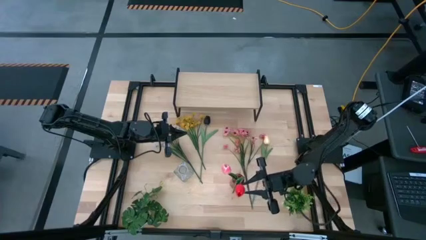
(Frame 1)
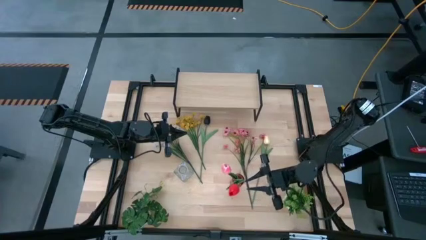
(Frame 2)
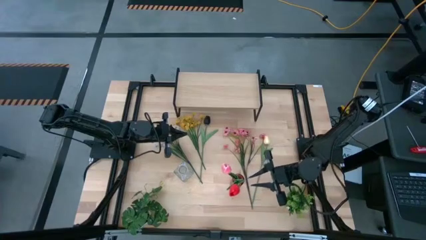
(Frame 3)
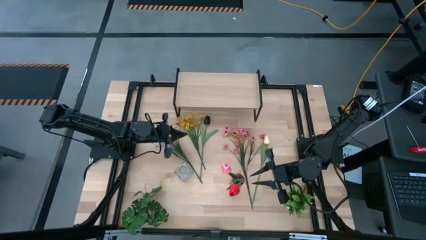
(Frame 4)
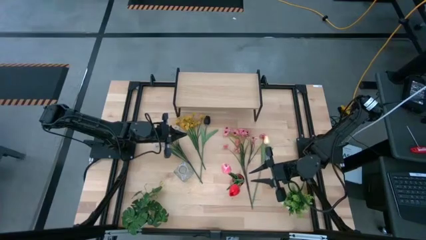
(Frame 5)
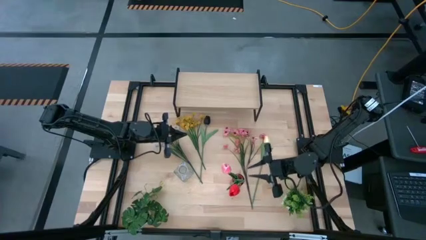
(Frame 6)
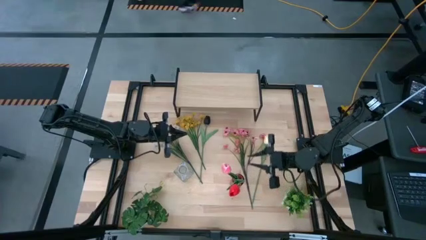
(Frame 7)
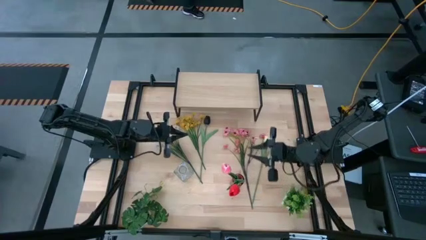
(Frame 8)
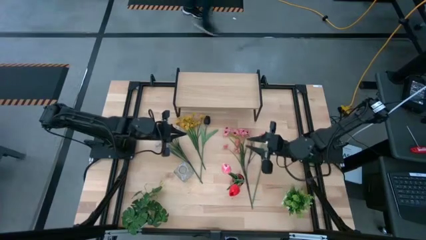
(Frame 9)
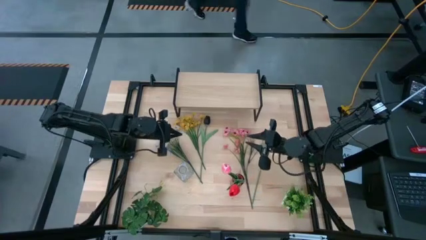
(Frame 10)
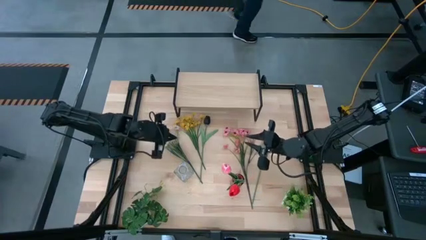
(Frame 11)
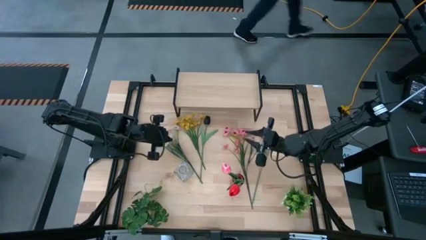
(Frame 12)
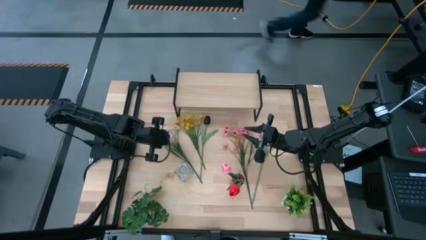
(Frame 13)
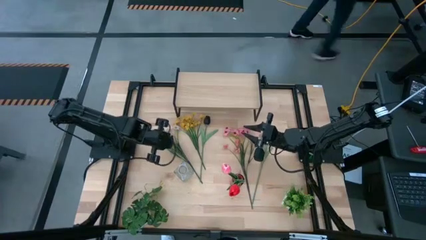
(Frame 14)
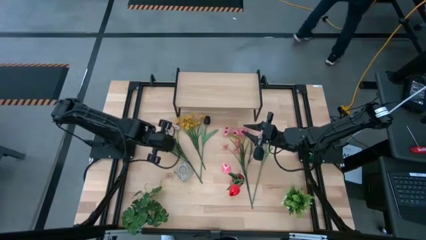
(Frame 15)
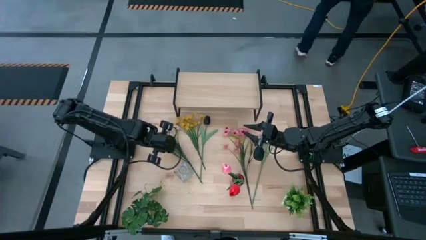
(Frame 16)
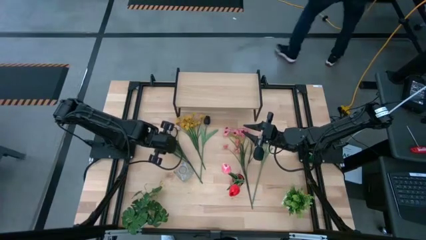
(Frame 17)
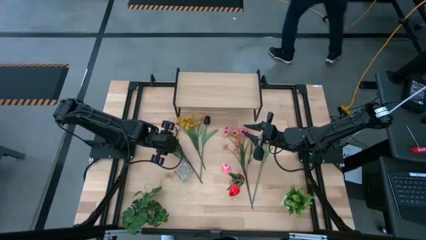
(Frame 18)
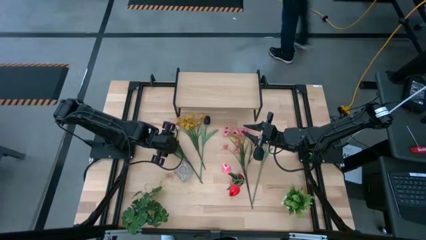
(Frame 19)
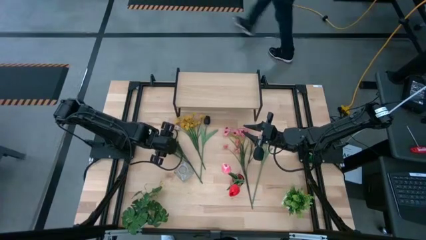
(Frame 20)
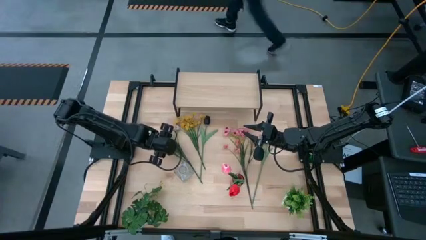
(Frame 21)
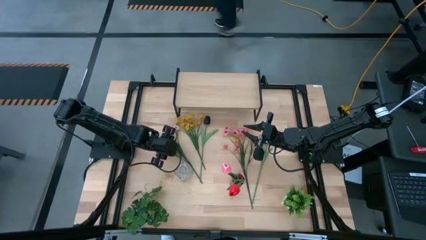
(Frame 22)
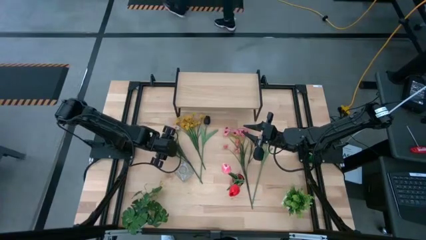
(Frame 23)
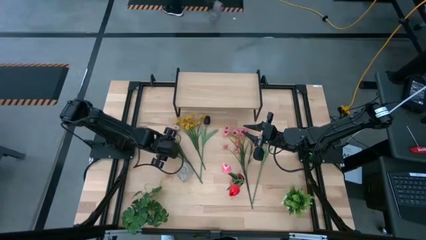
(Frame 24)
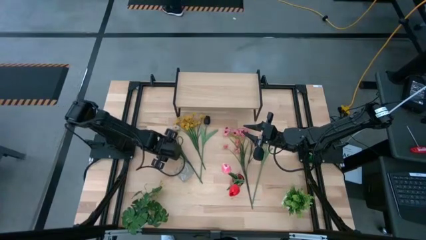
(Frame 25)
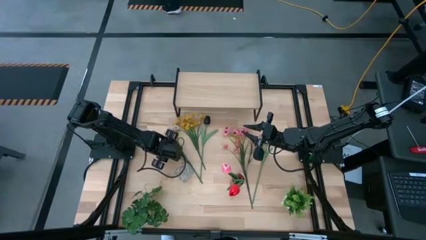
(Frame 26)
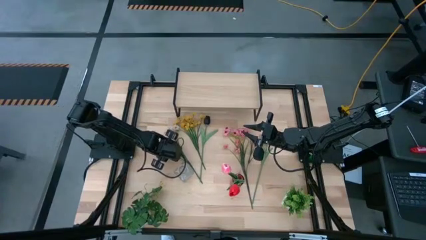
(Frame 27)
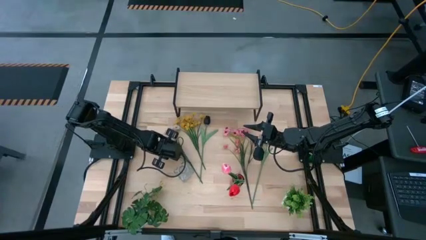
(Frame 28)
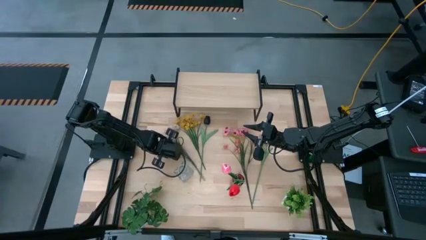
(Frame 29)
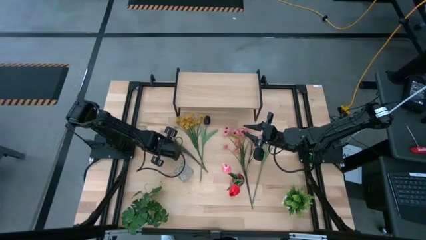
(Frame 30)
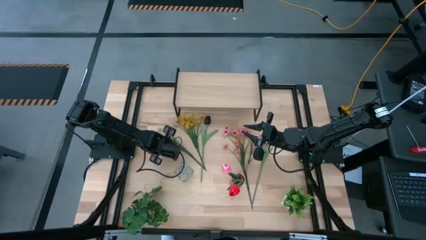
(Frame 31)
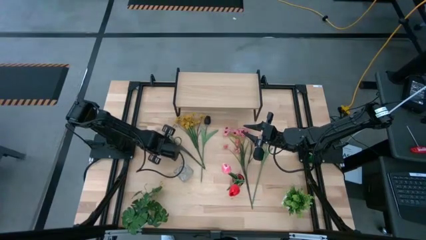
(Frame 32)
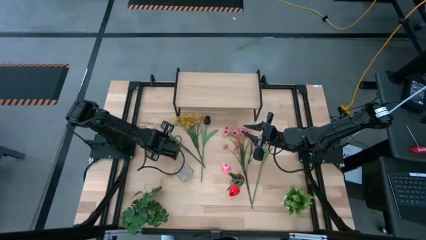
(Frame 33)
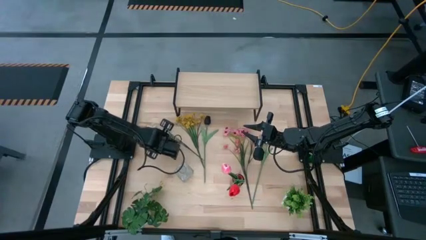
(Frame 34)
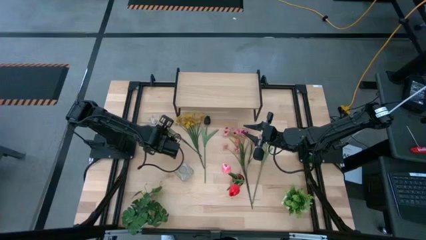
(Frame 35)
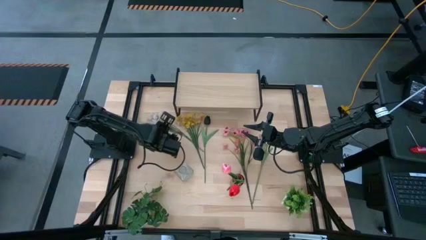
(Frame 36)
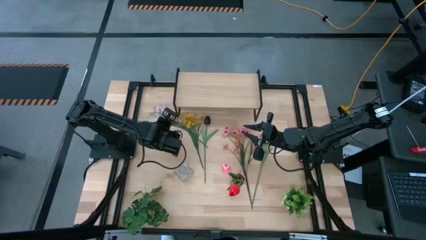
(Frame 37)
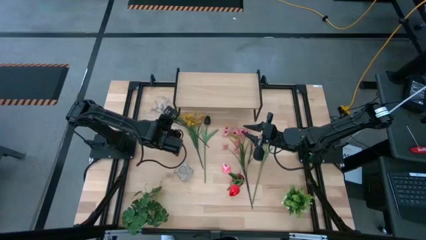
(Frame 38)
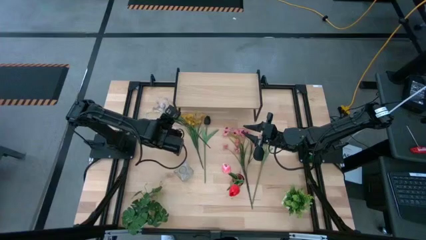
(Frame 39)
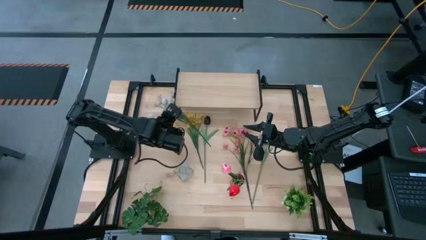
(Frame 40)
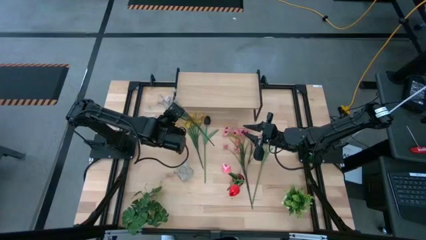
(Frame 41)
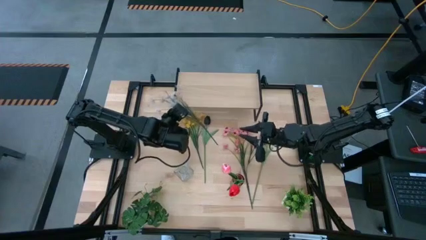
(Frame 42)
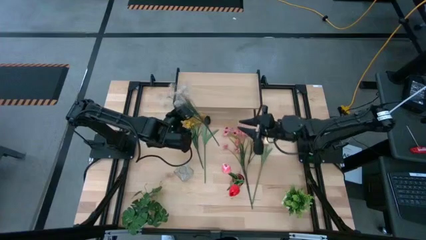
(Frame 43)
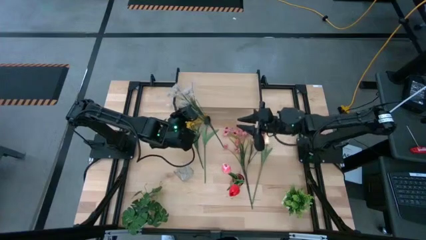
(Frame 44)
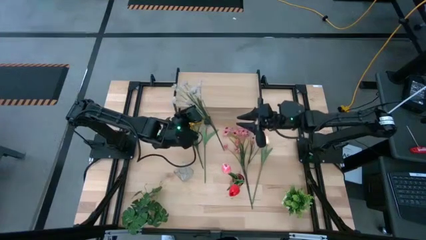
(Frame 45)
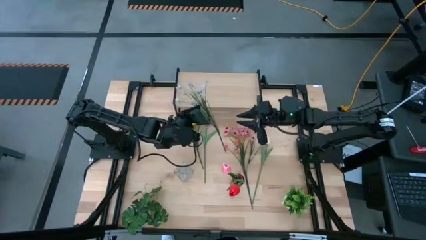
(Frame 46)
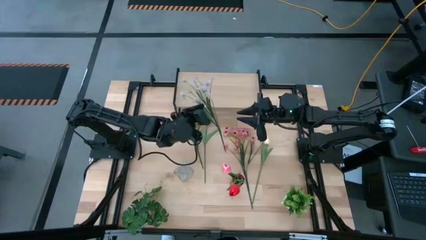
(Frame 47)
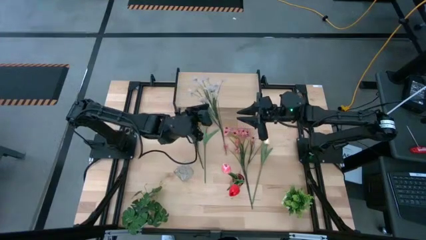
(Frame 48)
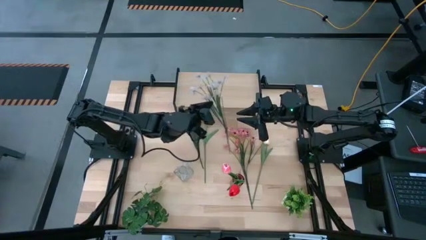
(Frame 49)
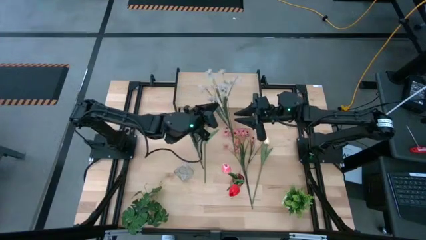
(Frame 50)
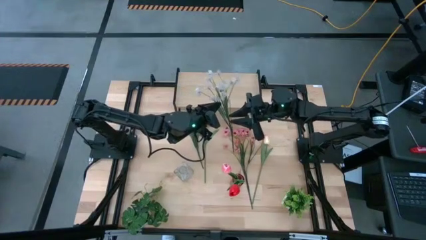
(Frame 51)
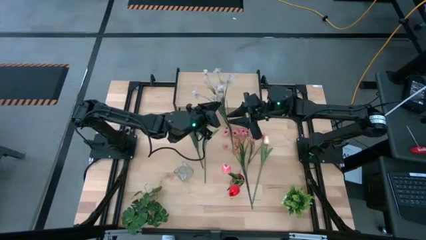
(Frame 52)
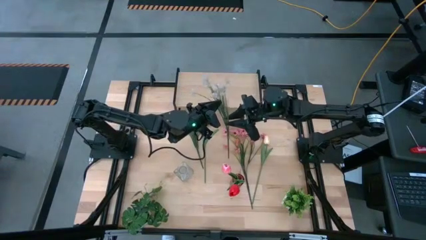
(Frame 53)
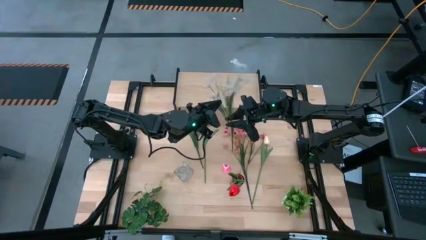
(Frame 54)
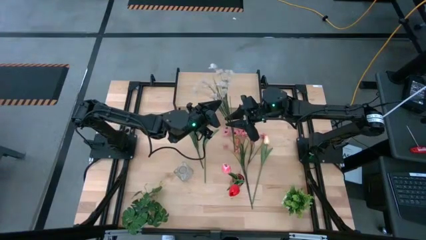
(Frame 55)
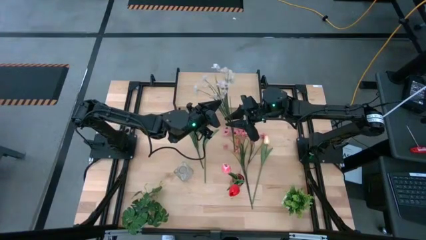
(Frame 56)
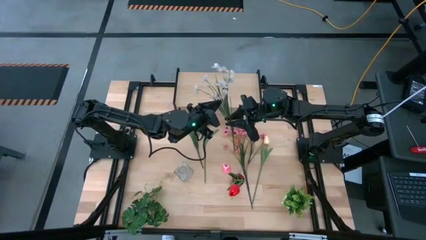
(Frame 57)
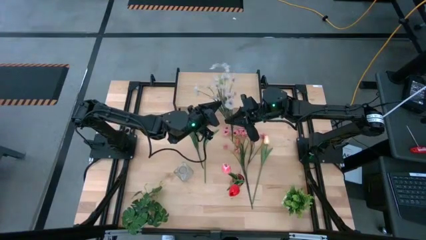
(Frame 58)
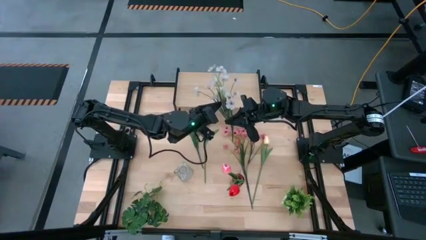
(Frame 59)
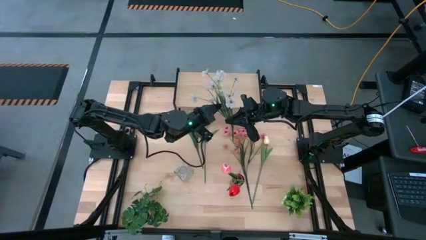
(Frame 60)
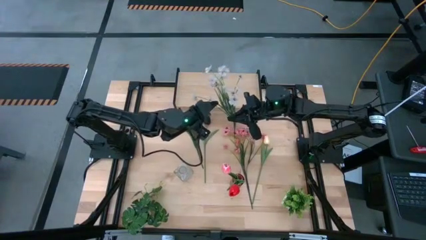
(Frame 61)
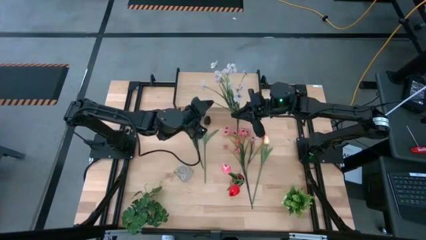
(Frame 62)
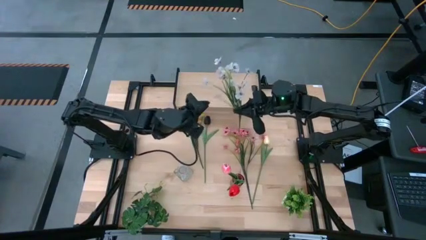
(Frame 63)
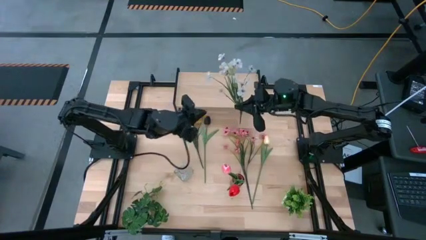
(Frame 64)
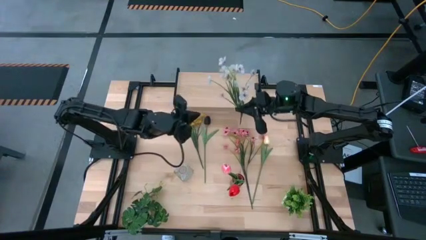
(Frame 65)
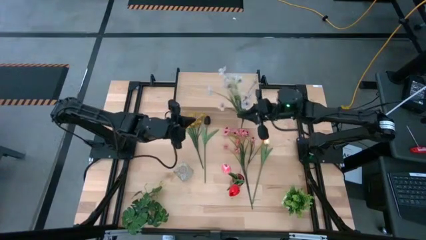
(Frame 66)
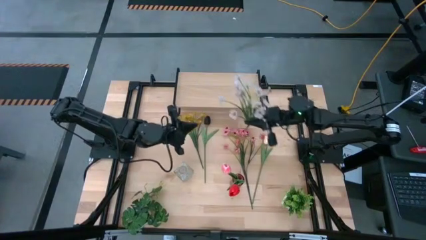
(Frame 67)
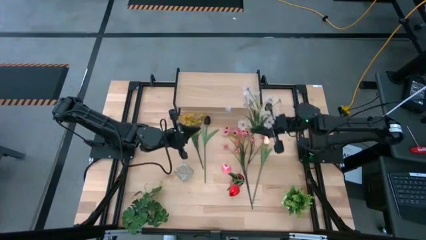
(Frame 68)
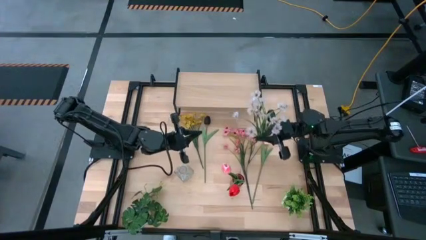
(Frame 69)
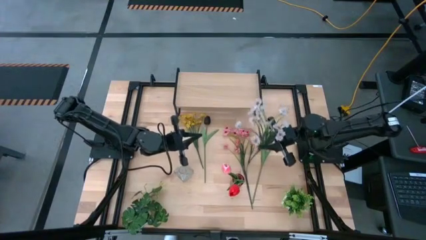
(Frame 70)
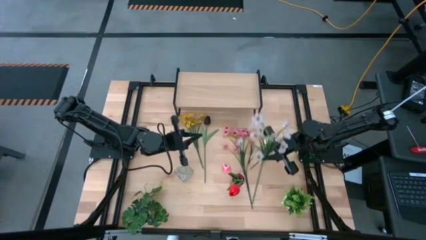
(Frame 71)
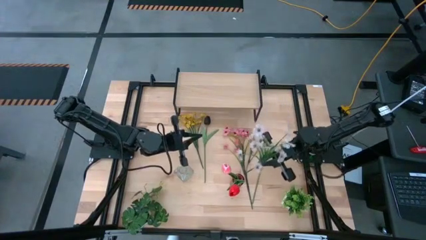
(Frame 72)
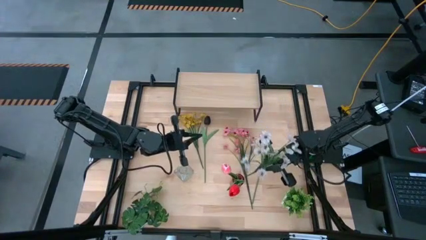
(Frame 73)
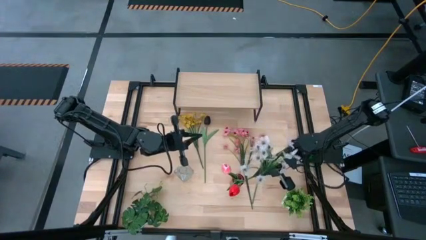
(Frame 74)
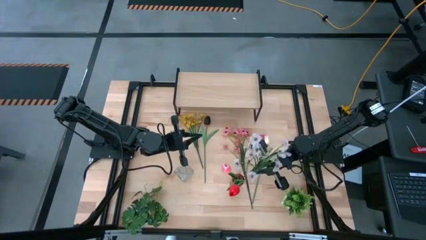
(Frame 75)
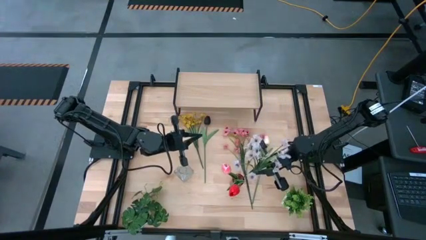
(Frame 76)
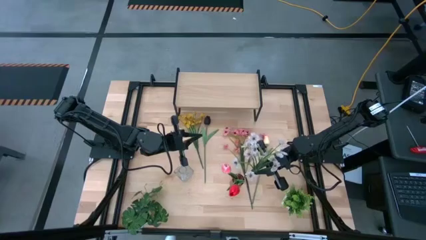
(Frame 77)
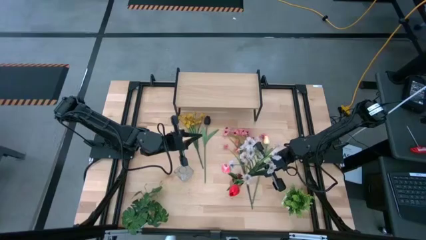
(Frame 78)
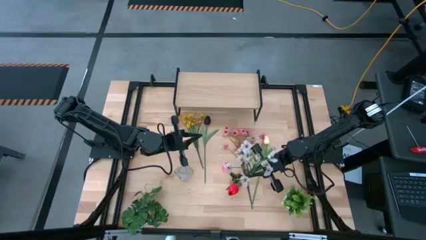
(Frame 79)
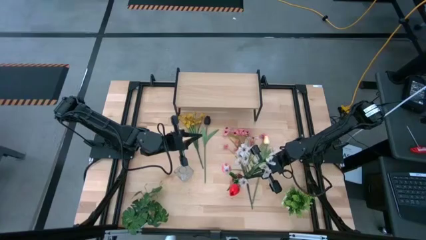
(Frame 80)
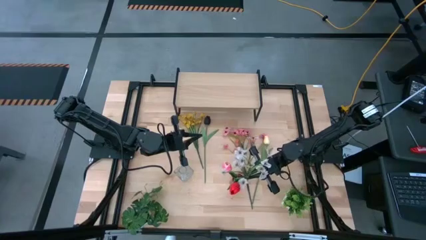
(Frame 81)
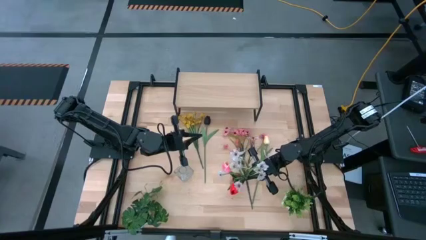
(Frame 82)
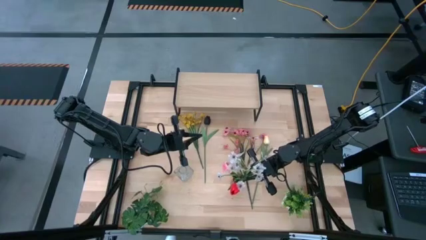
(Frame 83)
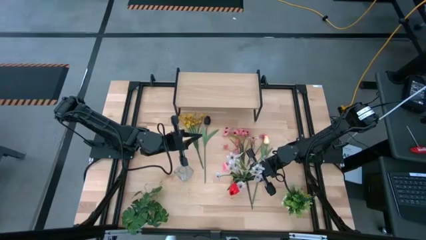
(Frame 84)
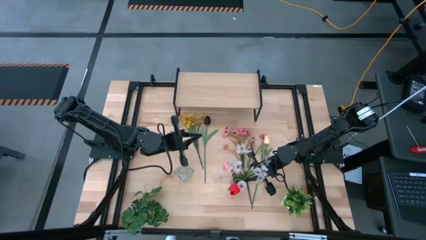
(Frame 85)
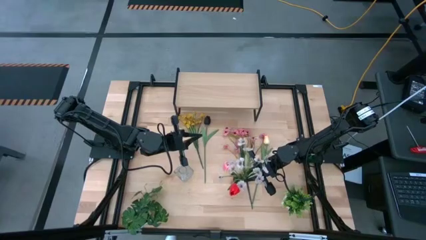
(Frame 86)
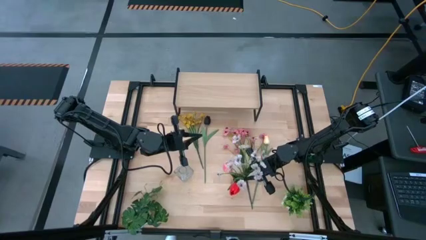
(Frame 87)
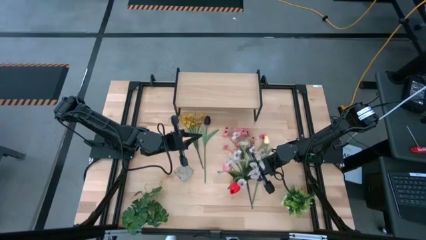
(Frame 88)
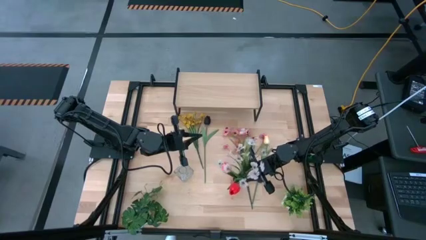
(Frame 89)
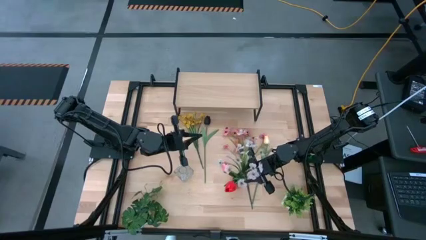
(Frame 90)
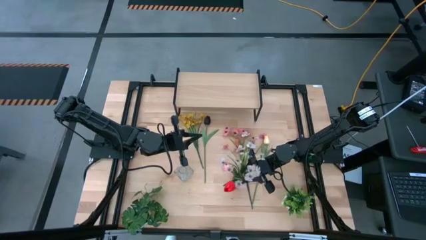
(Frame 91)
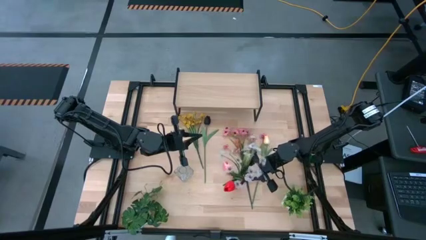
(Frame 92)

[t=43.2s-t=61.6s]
Task: Pick and place flowers into a vace then onto a shelf
Put the white flowers into the red vase
